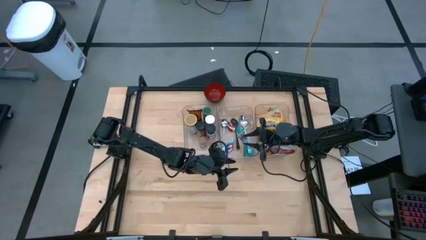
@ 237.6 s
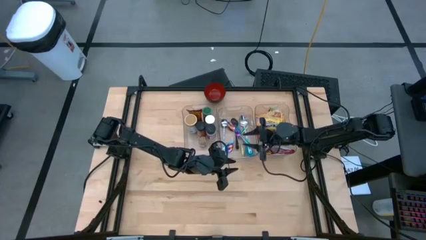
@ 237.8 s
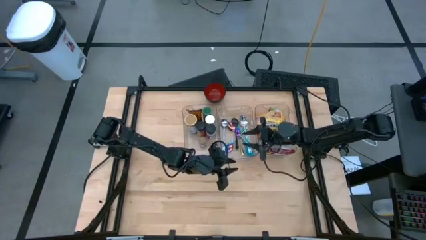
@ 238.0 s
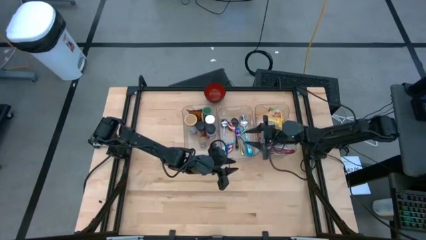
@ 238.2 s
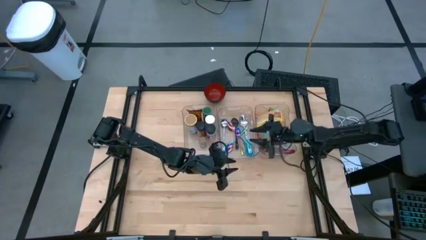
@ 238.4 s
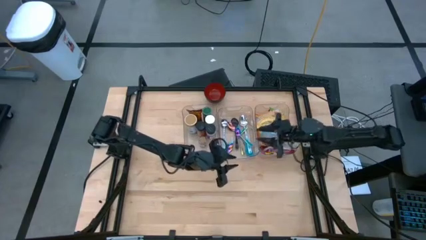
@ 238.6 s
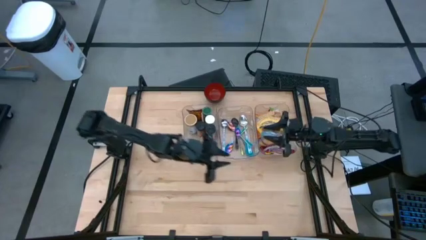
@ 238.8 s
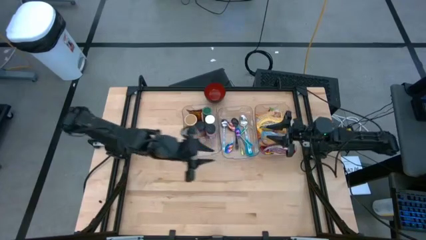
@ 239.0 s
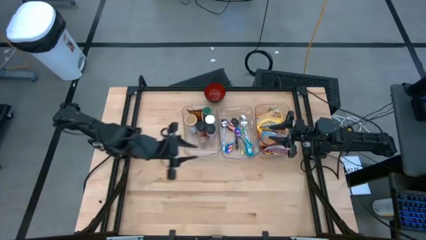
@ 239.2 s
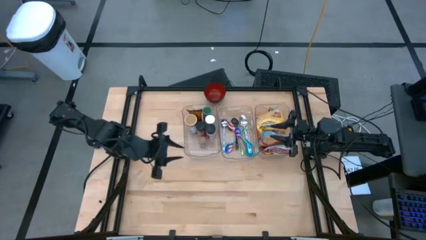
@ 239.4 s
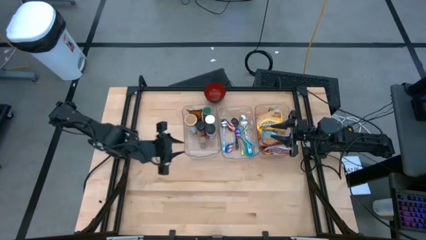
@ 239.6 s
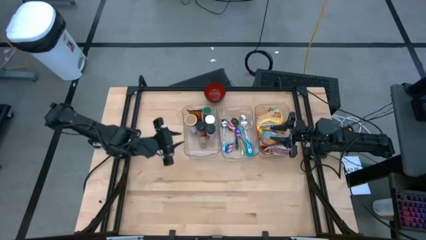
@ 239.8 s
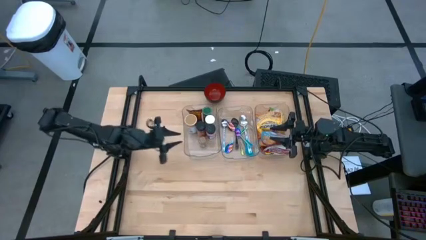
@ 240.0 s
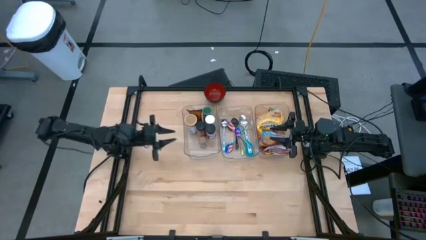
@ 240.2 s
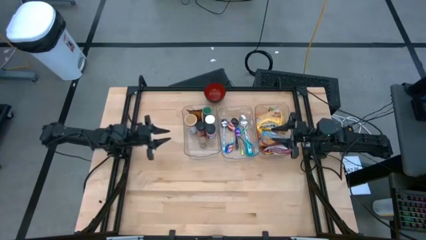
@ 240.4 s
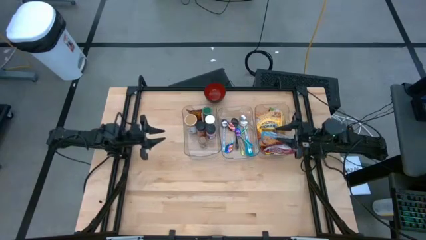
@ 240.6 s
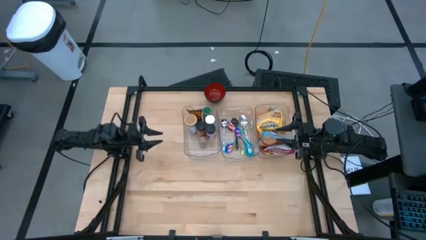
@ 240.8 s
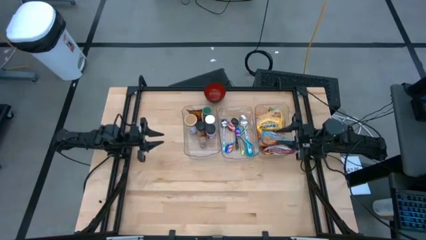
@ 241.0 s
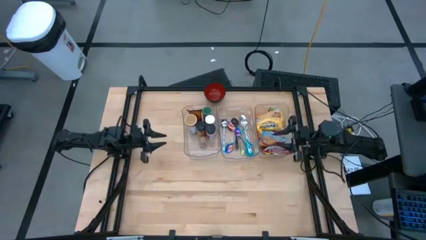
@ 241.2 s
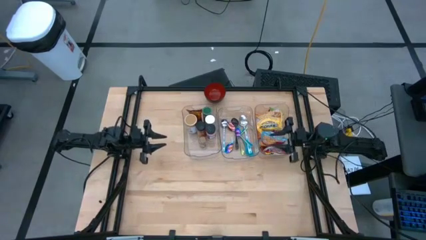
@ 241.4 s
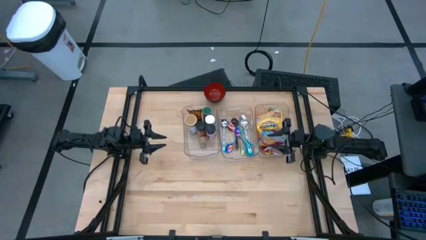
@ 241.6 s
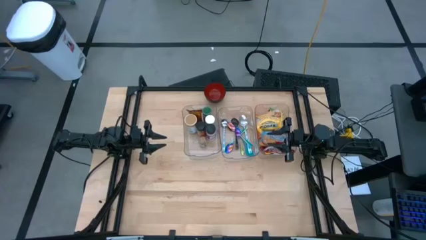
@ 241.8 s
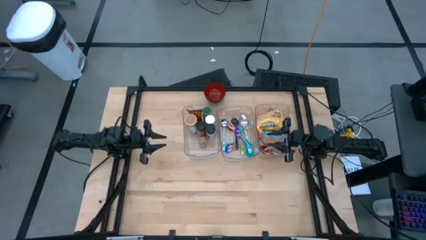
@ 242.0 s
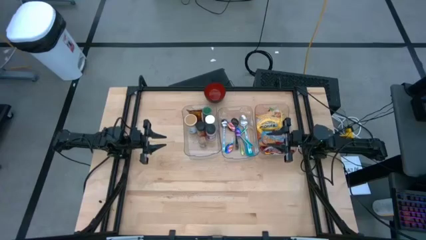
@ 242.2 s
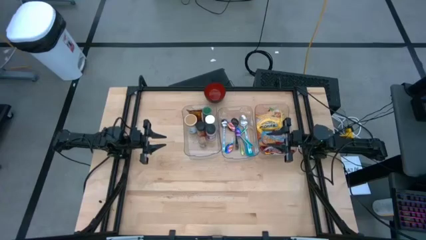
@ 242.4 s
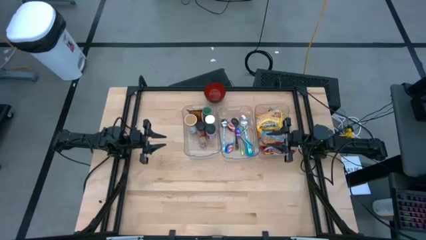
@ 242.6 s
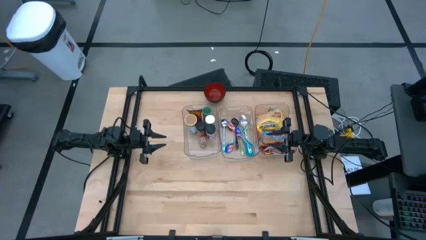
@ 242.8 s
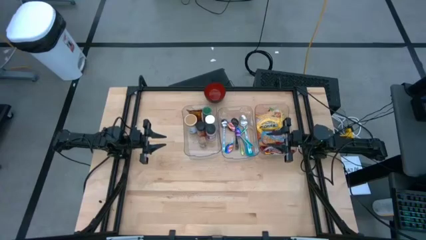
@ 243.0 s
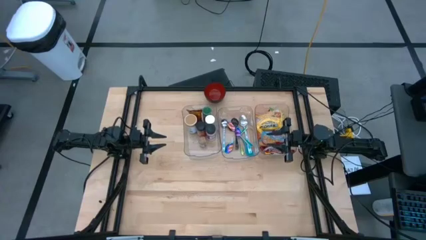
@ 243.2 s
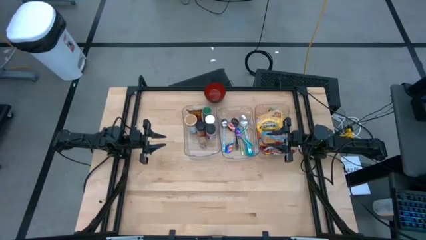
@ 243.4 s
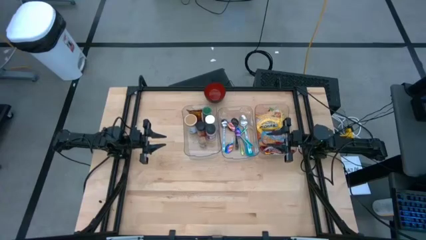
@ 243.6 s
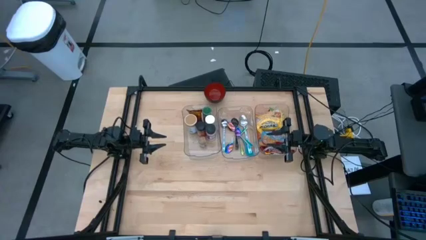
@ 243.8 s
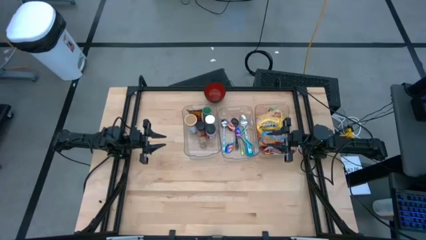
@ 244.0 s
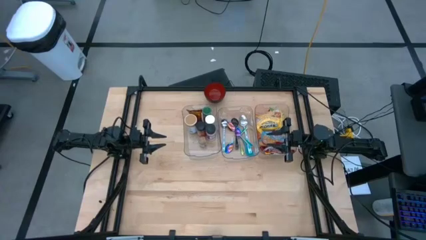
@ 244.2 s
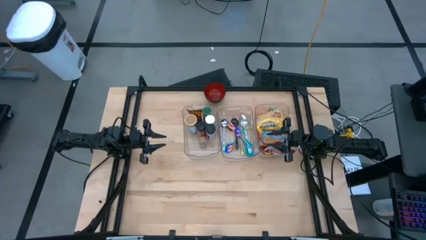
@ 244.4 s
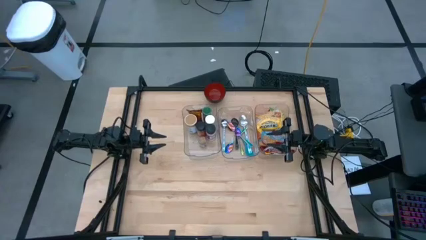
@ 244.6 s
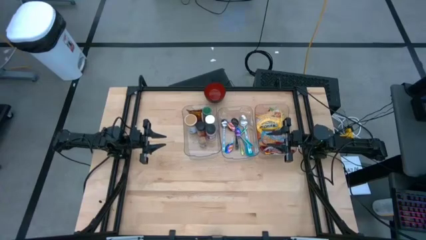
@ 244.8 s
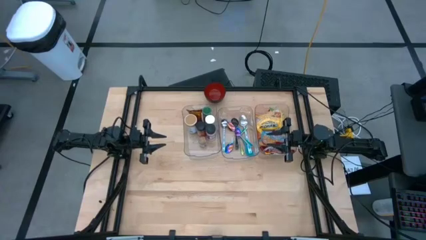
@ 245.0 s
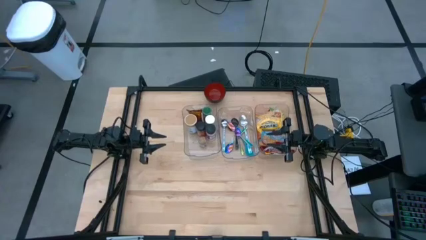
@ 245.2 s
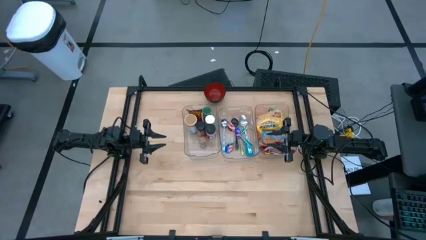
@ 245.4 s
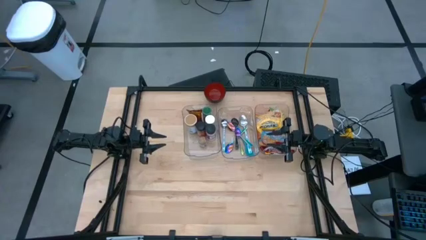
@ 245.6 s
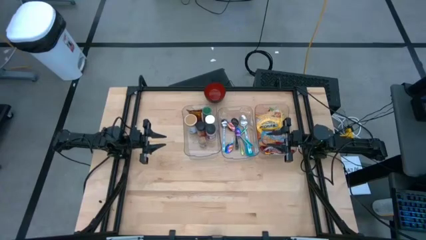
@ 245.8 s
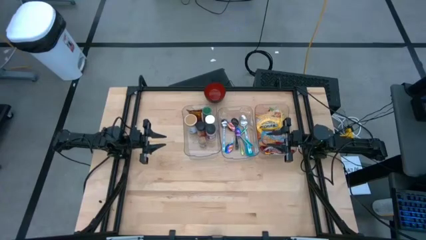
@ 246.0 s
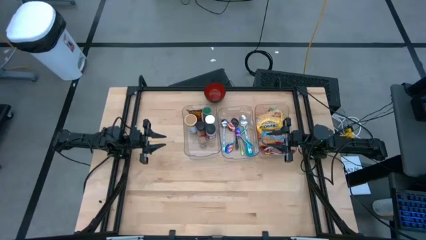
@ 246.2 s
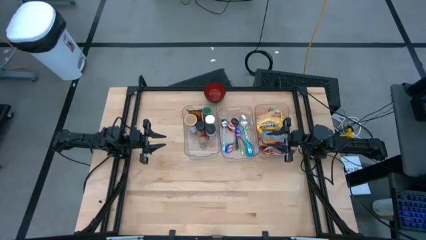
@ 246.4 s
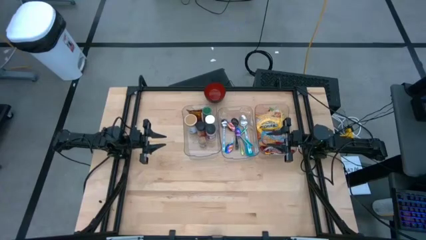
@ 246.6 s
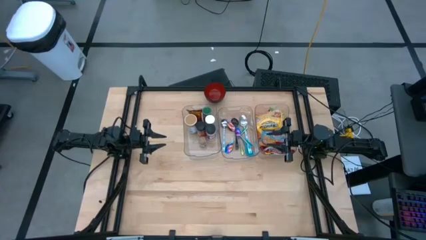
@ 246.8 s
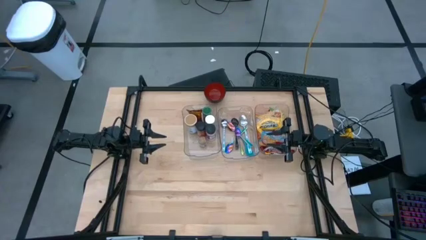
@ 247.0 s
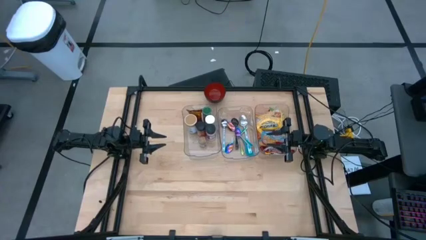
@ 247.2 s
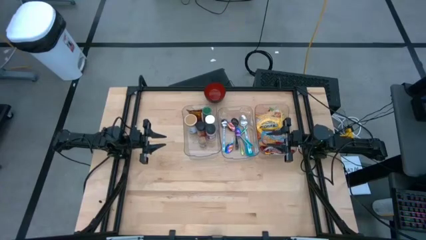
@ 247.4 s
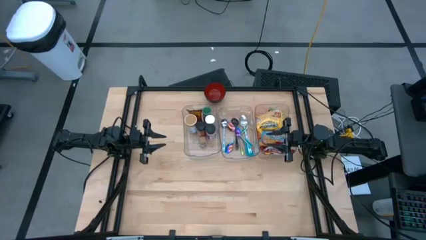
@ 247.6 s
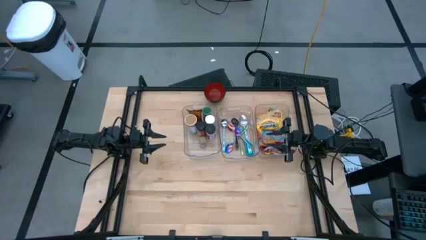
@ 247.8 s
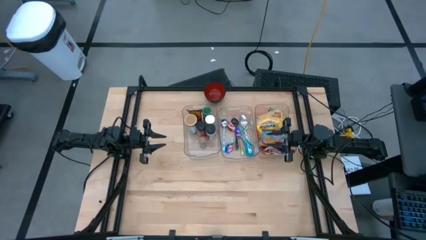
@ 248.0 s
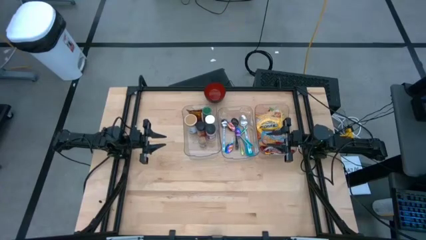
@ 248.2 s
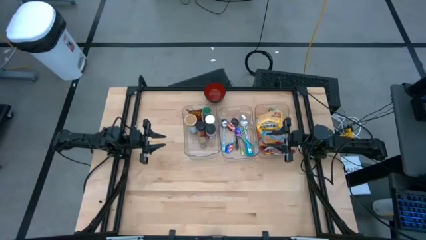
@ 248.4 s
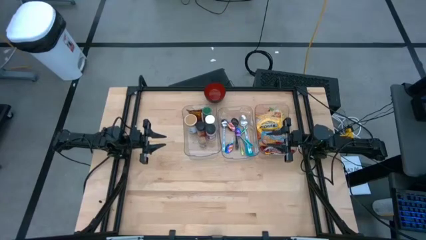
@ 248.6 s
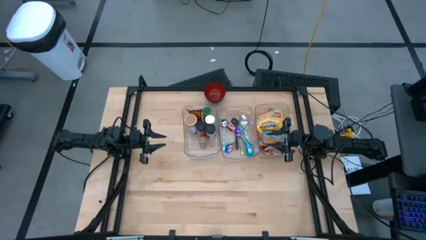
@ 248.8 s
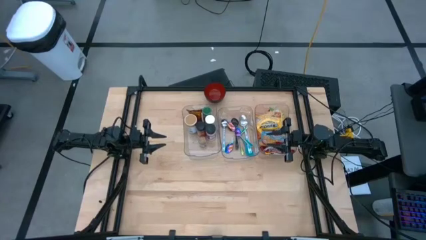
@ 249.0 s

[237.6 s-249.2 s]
Task: Pick & Place Food Item
Return to Home Position
